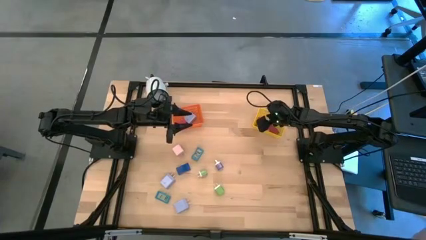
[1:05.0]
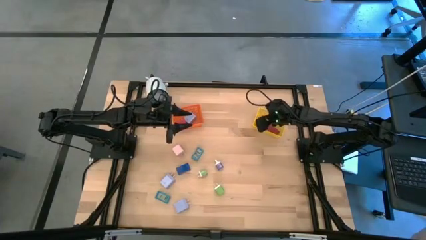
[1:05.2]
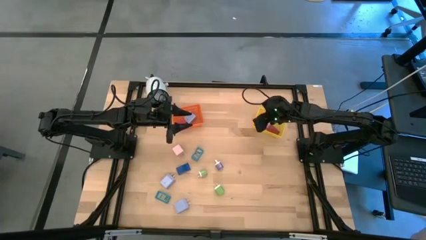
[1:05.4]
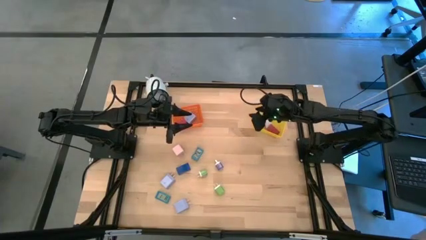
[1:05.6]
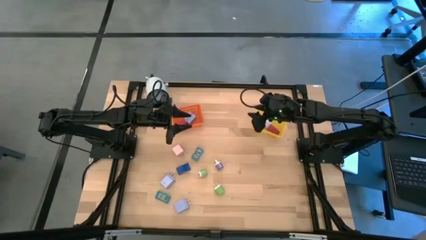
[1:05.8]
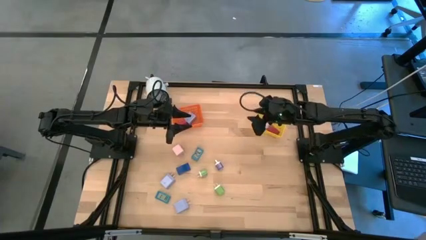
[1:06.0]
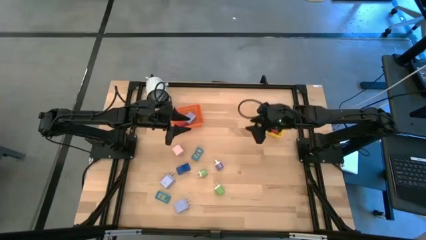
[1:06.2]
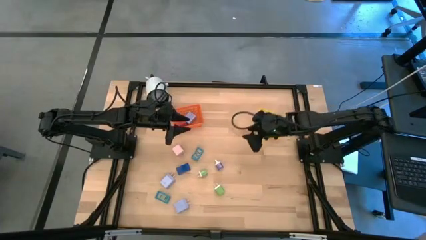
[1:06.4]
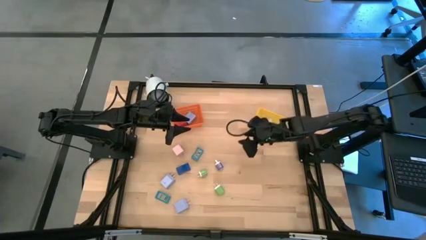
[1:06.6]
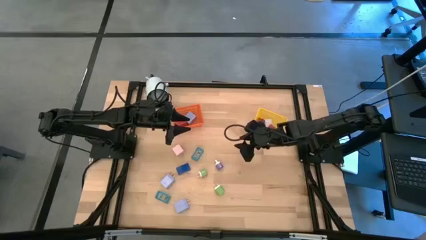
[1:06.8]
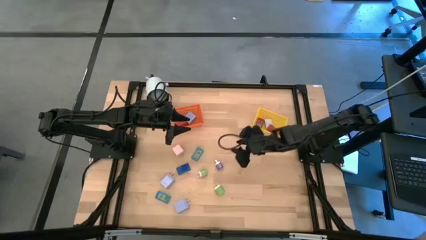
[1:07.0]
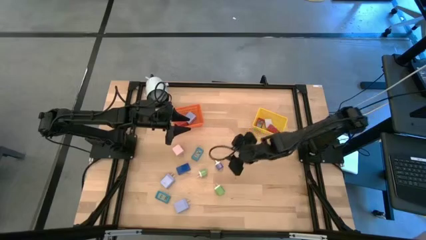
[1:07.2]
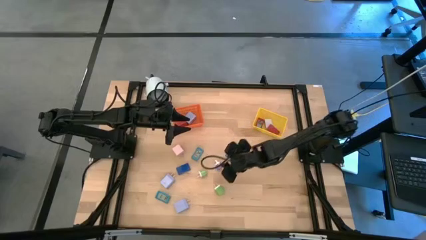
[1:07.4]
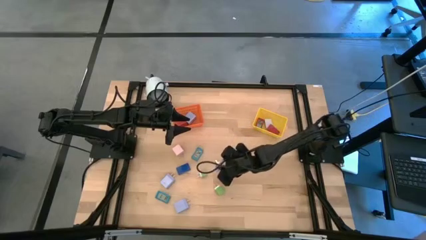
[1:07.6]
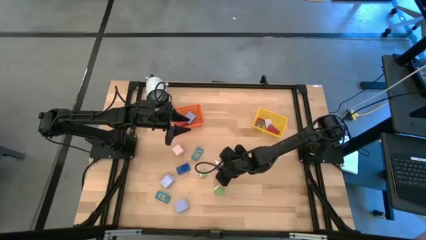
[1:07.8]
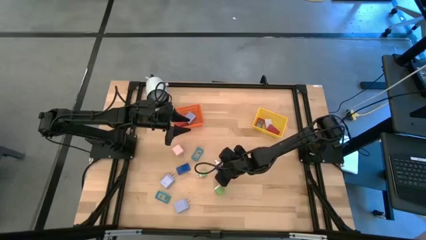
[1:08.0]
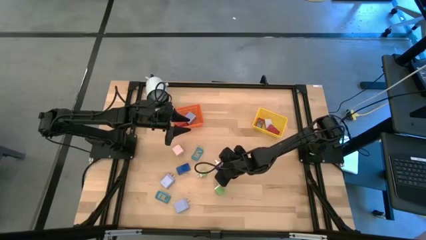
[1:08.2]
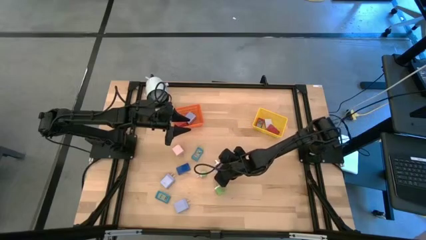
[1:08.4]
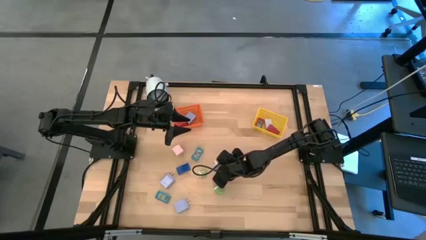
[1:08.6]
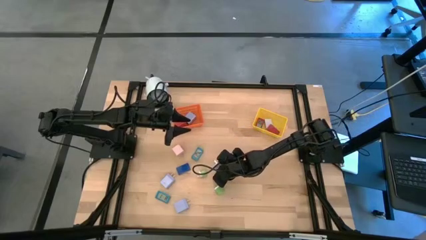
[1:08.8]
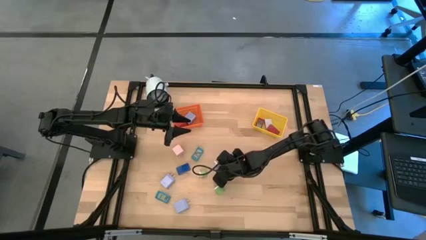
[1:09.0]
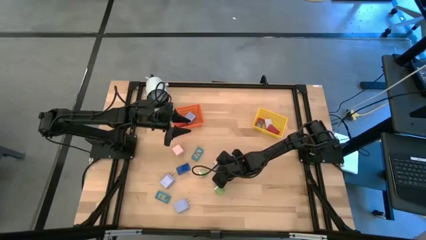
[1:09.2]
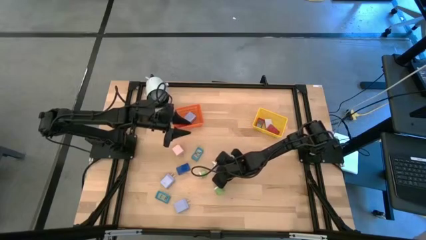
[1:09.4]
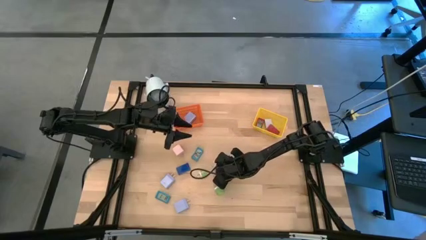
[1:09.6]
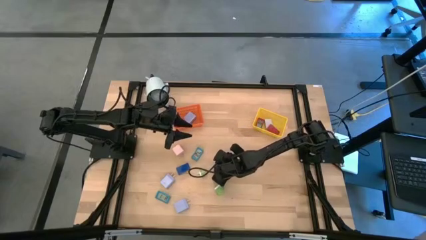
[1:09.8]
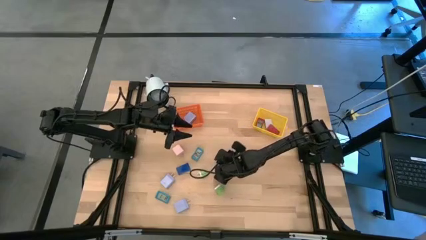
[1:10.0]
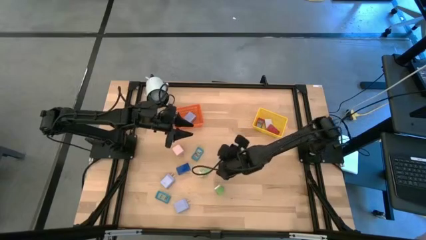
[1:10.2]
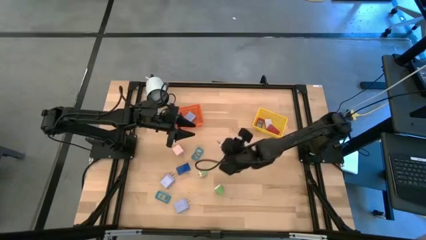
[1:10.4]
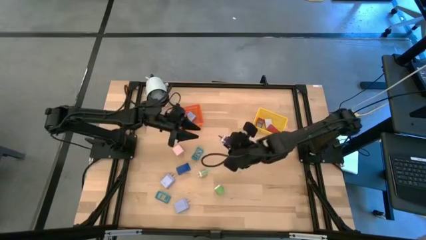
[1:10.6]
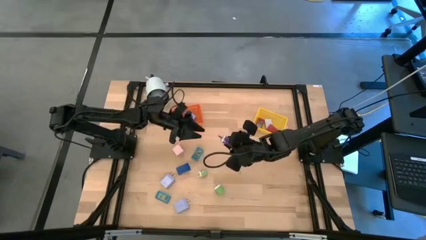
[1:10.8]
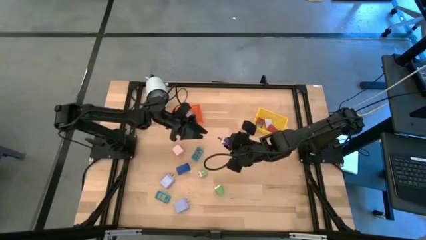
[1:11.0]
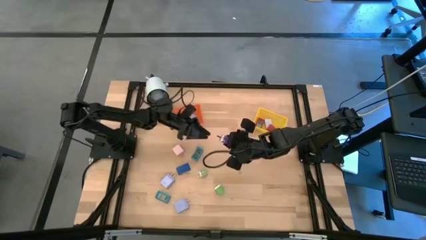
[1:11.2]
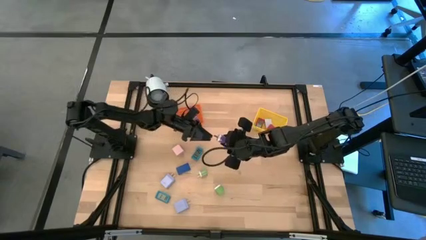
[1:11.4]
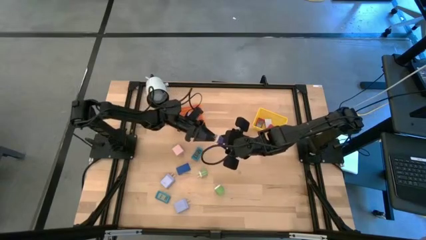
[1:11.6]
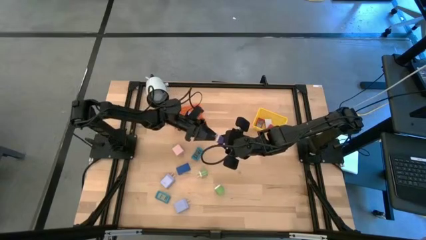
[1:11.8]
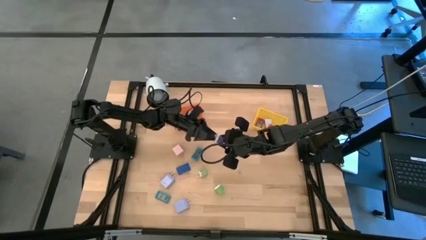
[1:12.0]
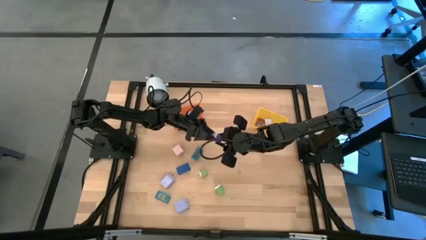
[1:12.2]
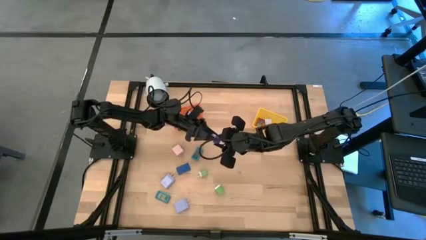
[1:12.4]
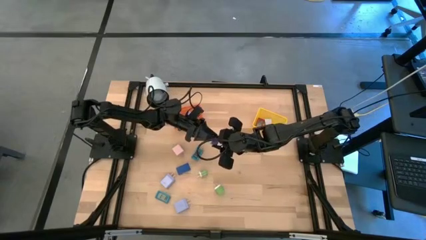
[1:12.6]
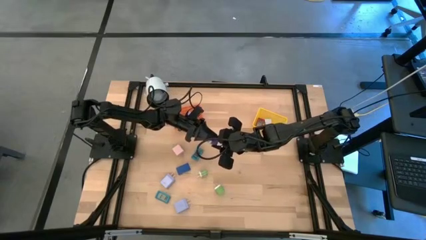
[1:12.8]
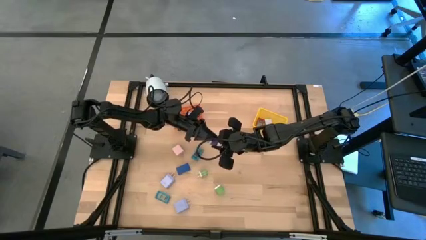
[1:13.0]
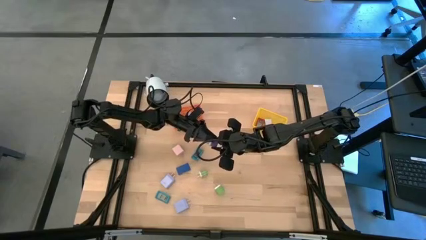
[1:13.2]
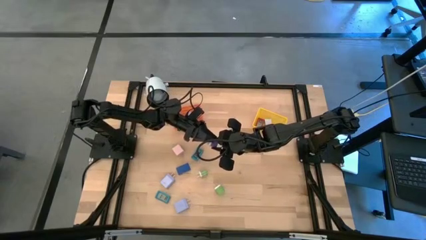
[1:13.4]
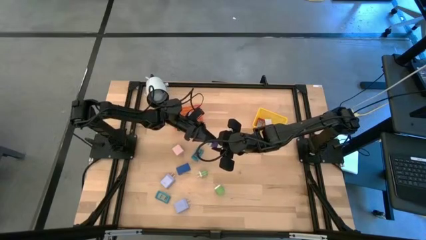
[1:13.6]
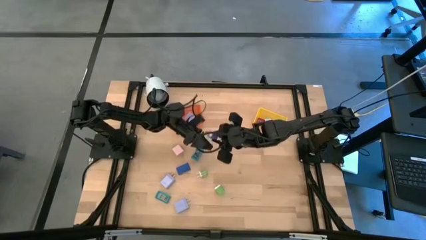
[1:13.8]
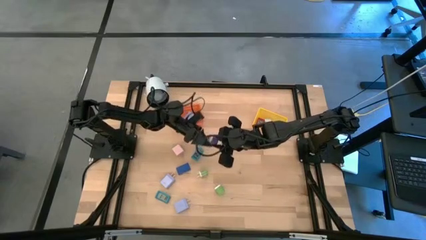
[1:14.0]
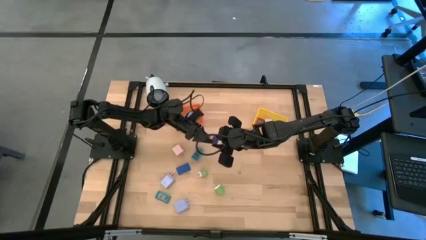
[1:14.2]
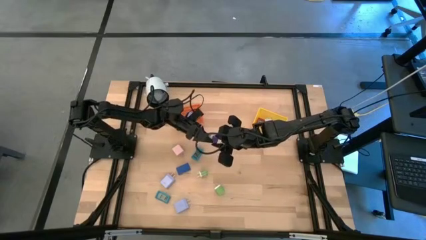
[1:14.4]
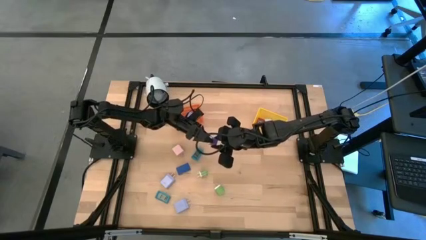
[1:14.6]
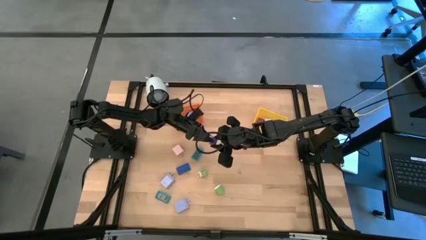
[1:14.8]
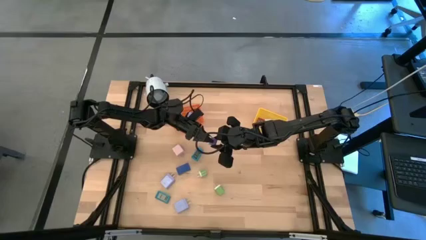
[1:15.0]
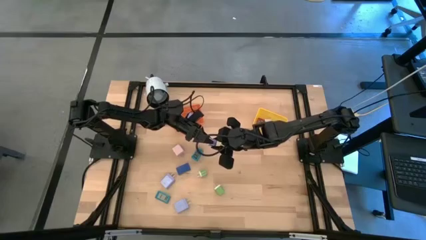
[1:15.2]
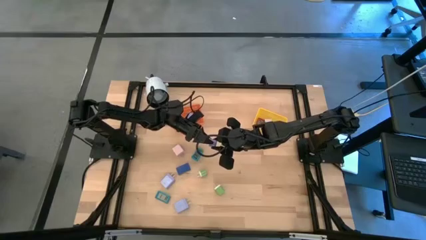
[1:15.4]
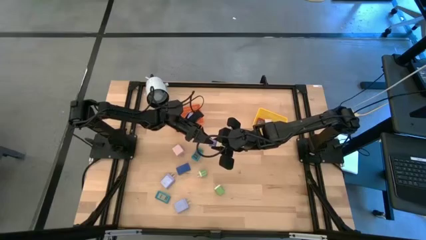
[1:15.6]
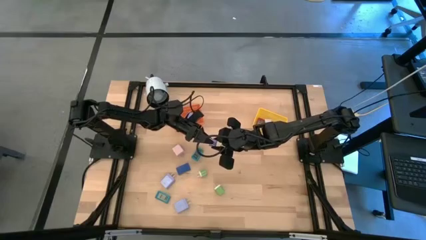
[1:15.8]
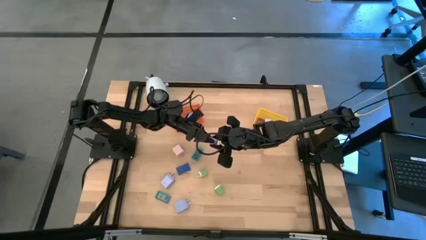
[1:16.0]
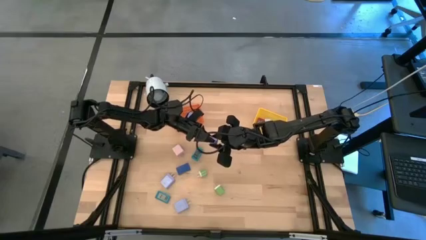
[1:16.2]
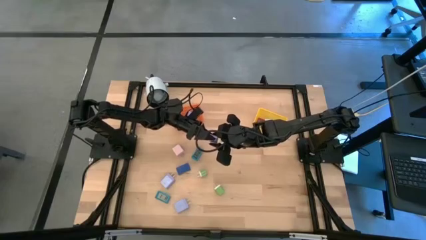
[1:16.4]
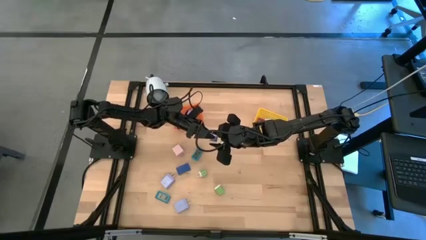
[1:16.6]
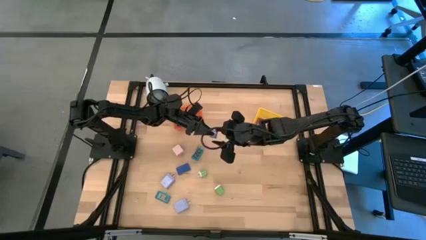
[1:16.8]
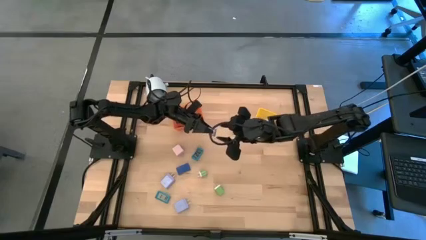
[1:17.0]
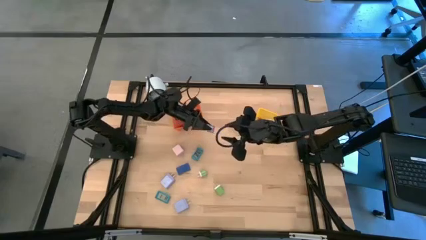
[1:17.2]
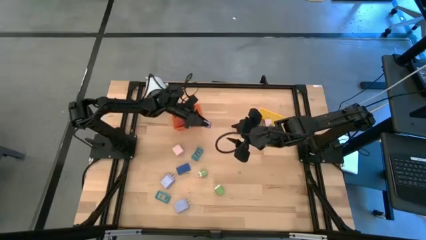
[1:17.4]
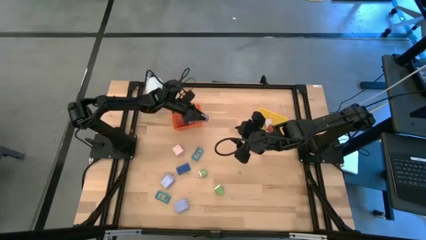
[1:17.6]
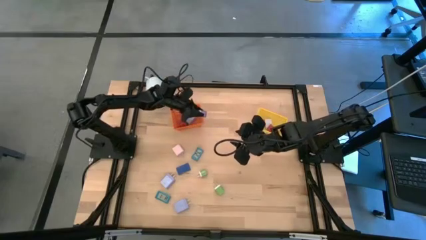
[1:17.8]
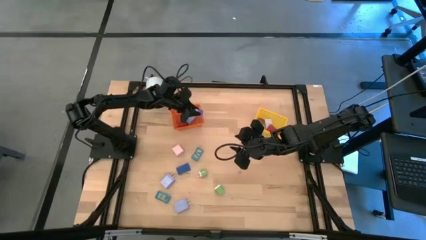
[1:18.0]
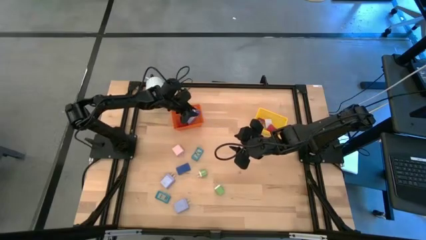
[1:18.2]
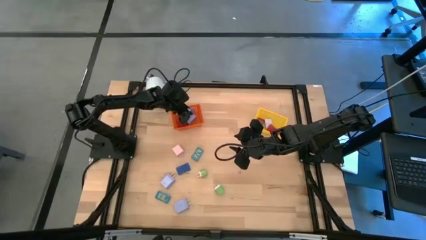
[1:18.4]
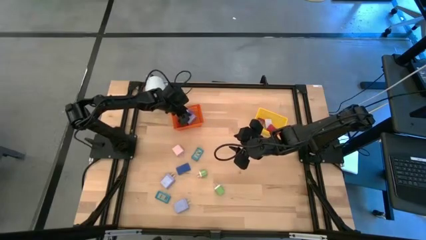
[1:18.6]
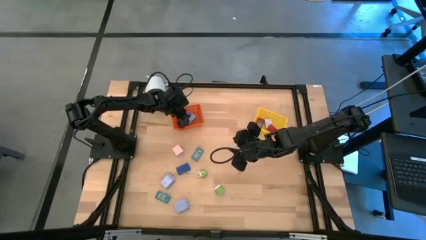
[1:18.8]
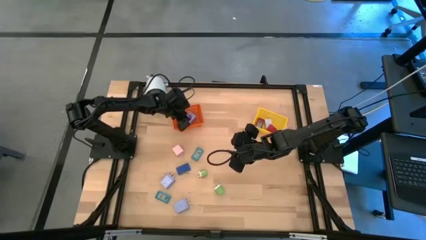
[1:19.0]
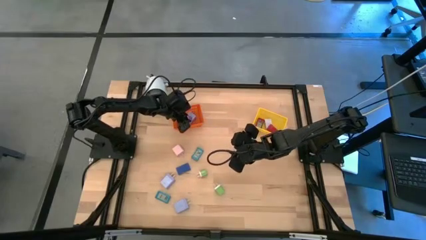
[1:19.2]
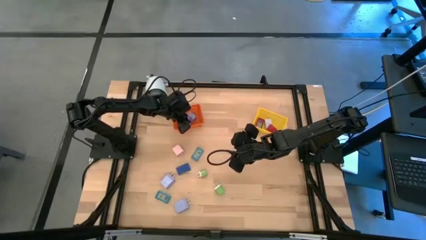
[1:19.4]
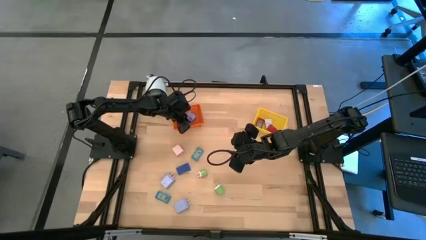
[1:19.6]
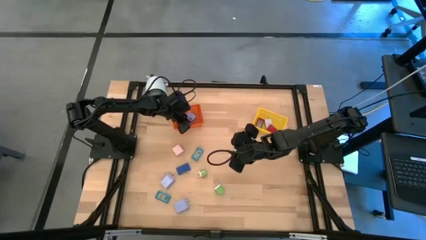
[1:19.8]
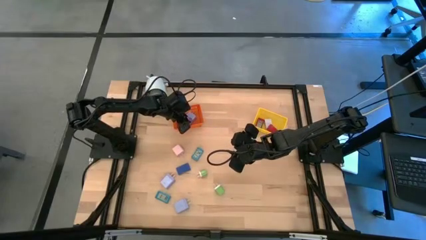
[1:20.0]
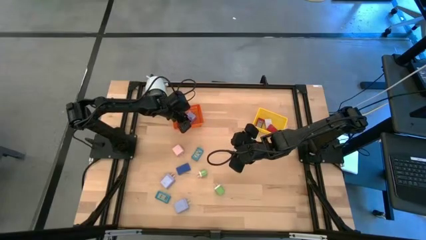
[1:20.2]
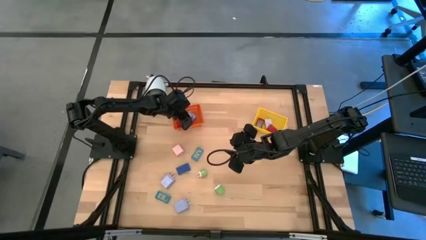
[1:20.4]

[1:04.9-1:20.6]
Task: Pick & Place Office items
Put the white purple charger adapter into the orange bin
